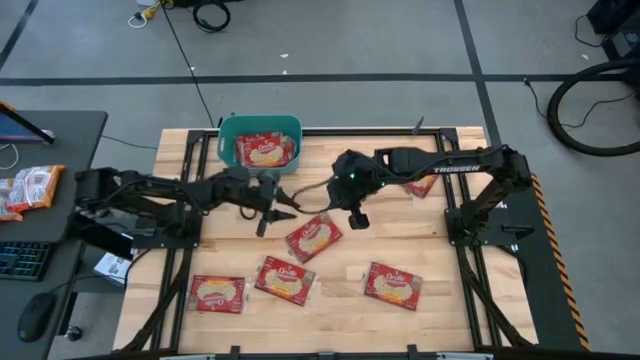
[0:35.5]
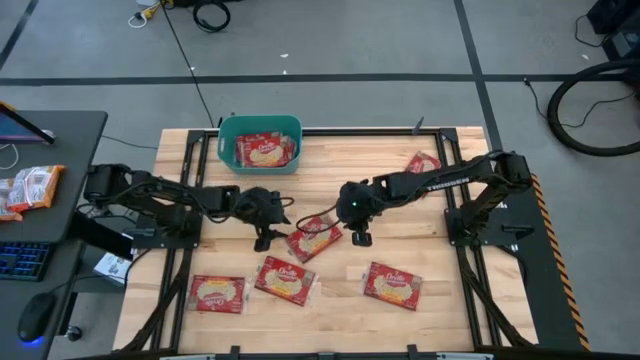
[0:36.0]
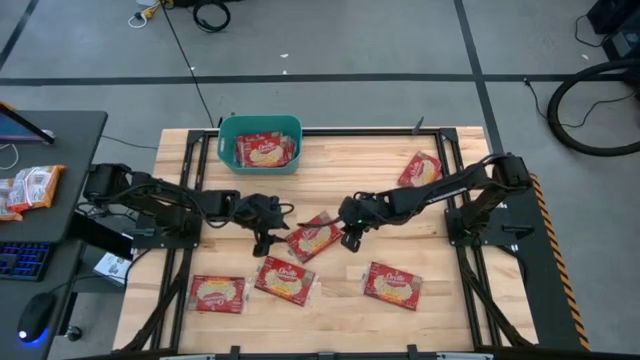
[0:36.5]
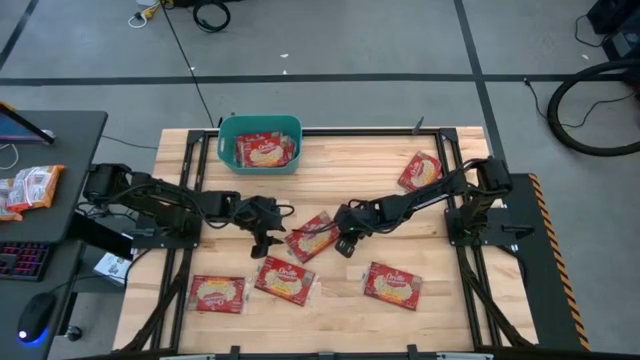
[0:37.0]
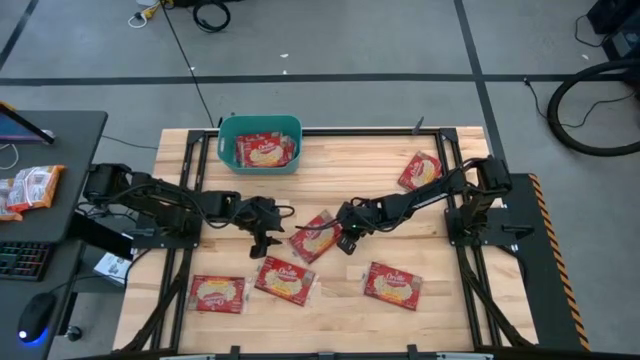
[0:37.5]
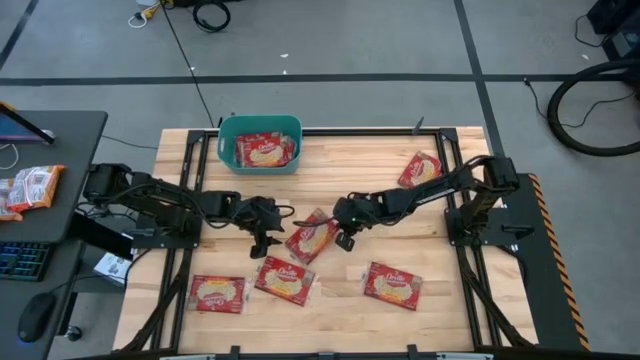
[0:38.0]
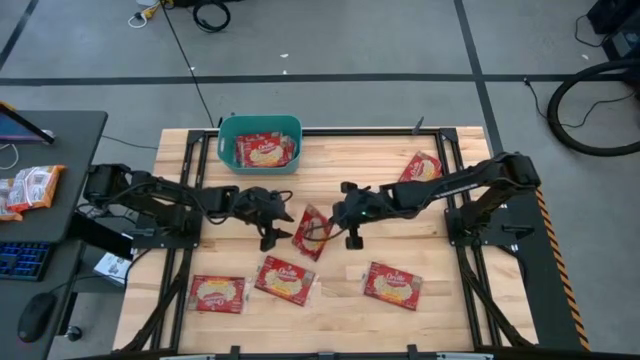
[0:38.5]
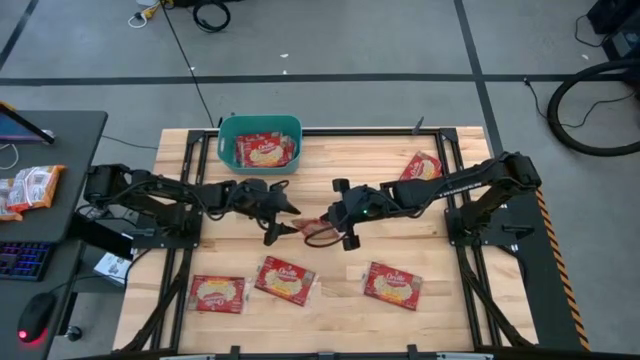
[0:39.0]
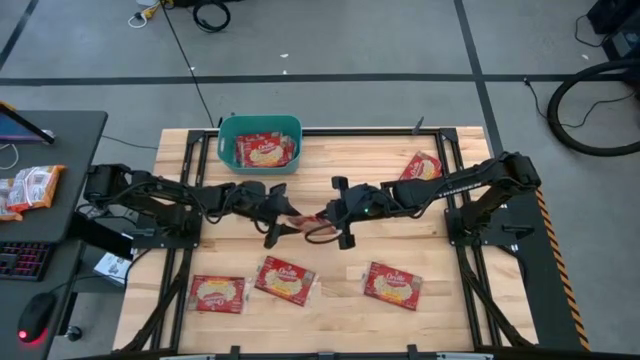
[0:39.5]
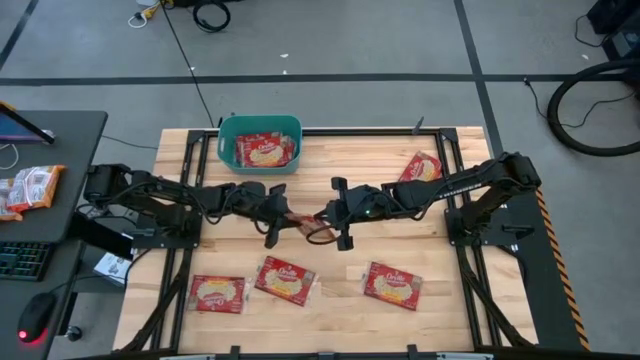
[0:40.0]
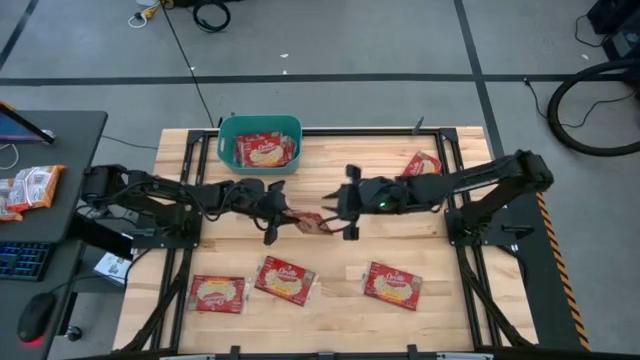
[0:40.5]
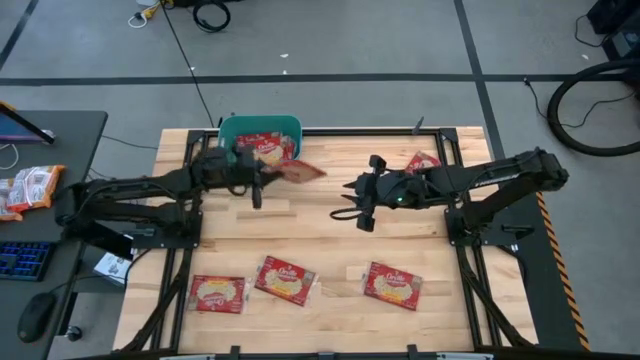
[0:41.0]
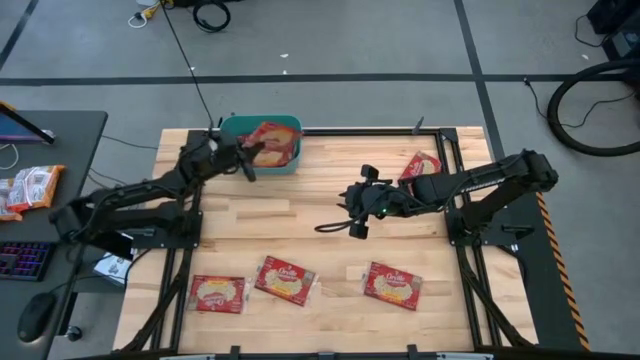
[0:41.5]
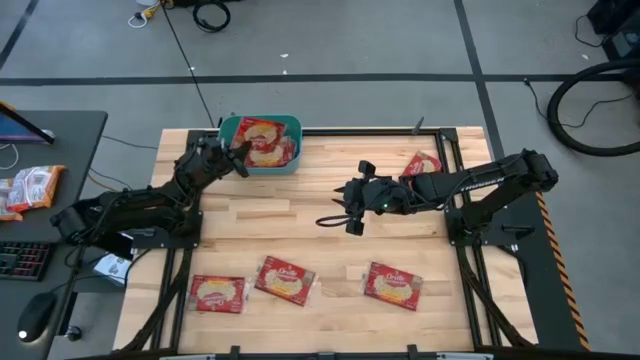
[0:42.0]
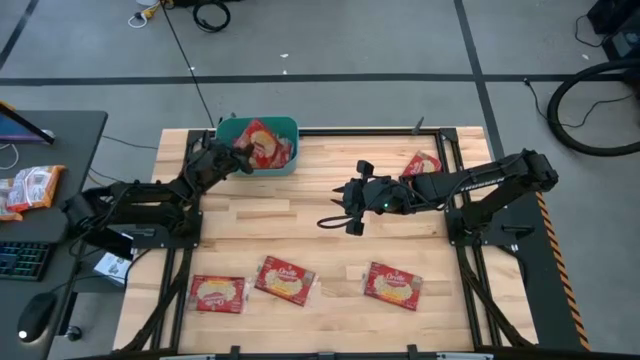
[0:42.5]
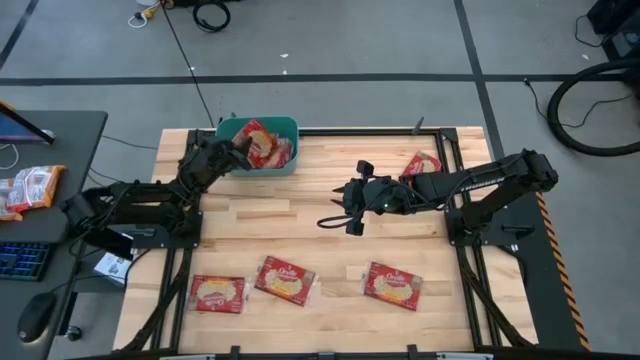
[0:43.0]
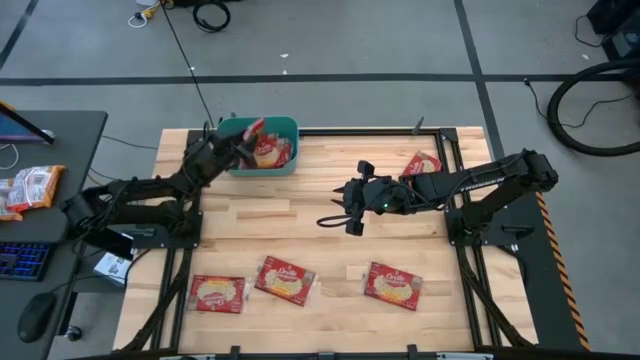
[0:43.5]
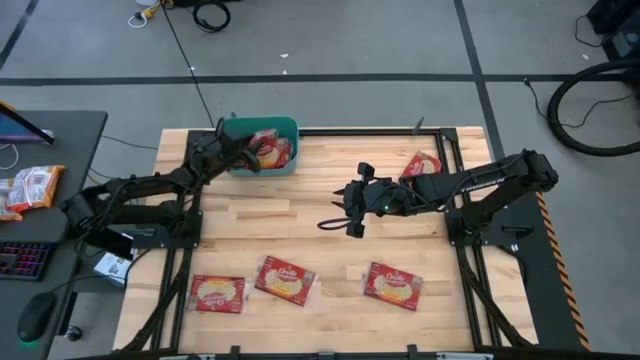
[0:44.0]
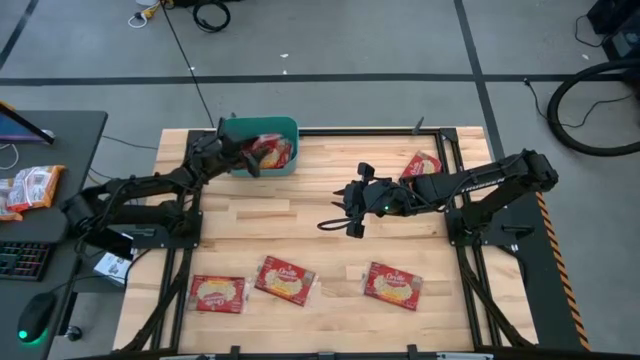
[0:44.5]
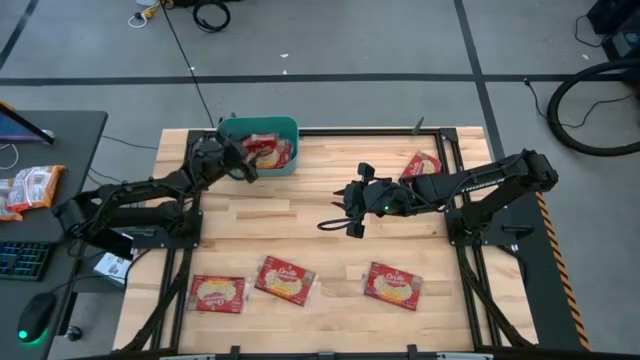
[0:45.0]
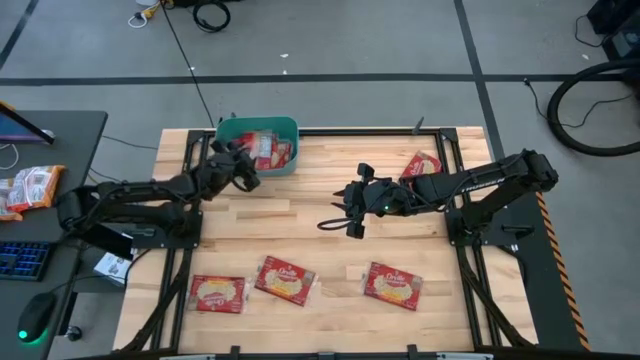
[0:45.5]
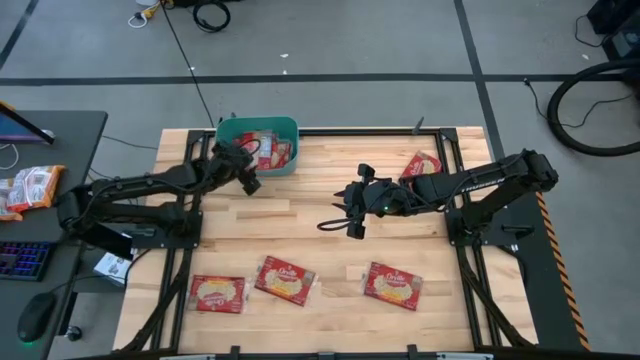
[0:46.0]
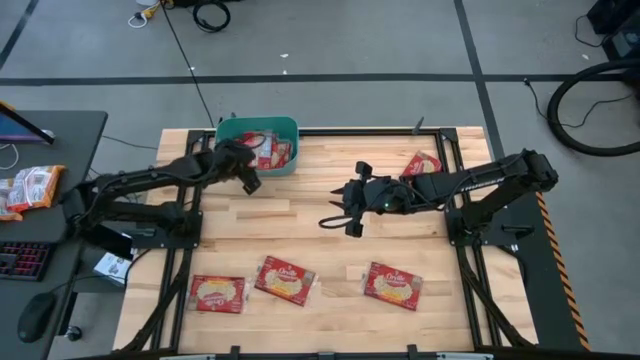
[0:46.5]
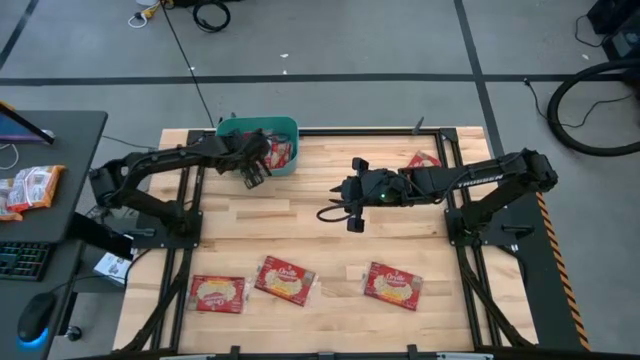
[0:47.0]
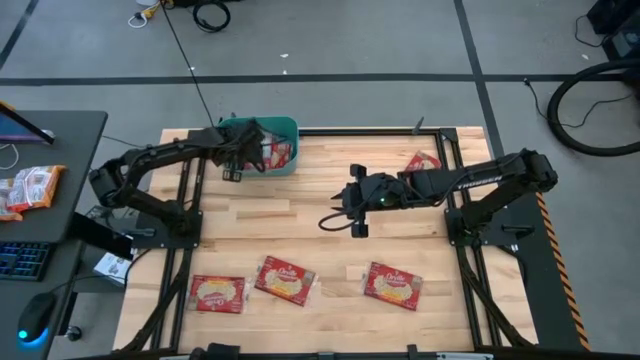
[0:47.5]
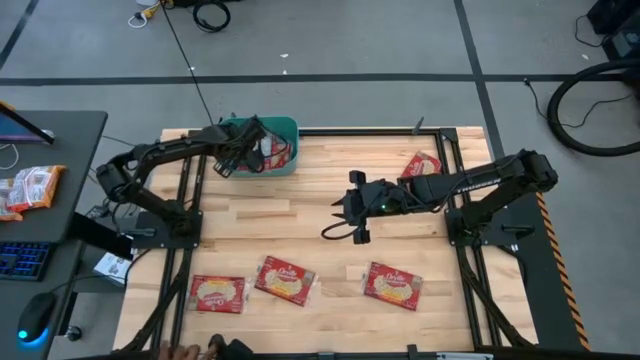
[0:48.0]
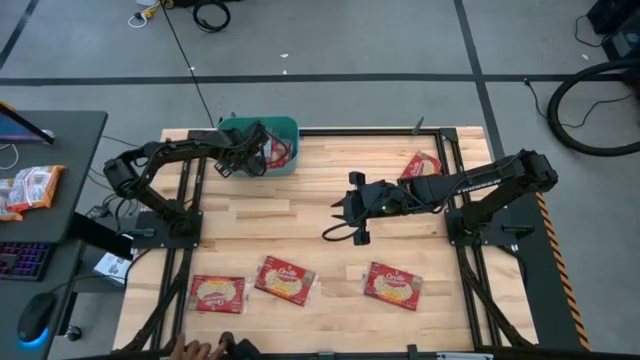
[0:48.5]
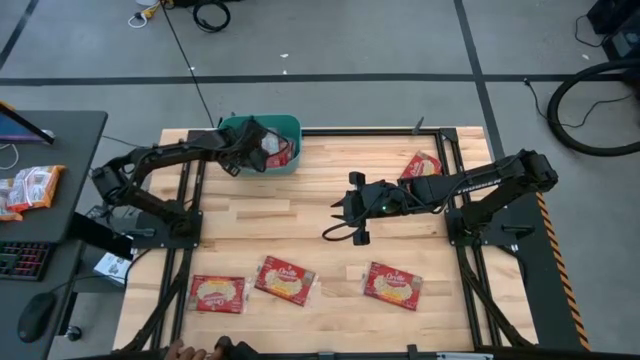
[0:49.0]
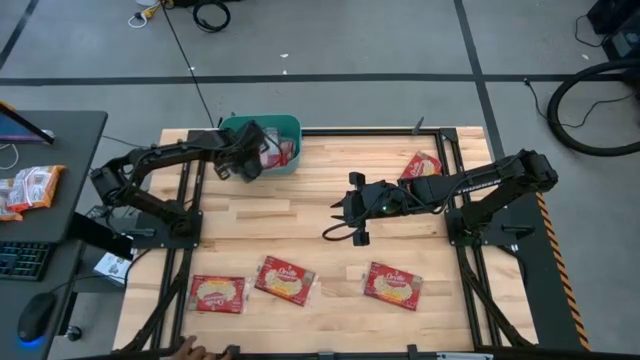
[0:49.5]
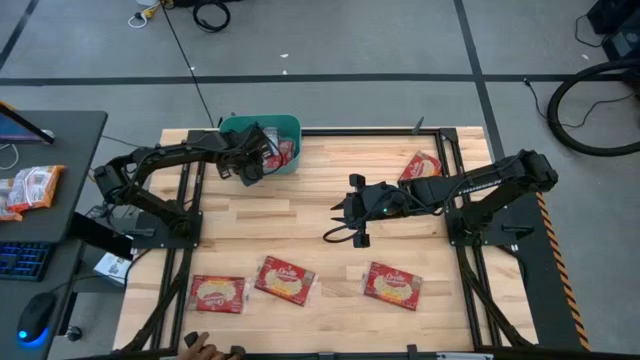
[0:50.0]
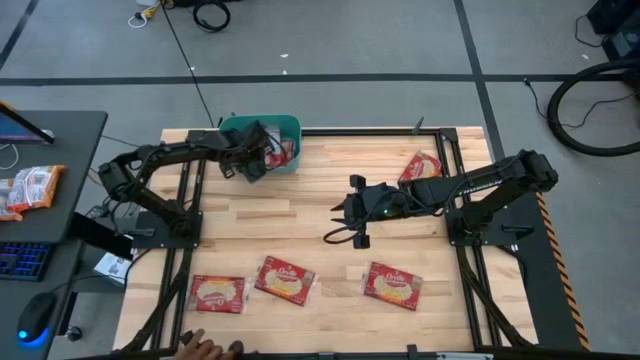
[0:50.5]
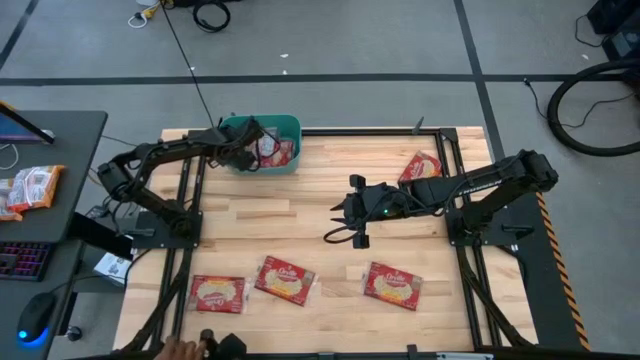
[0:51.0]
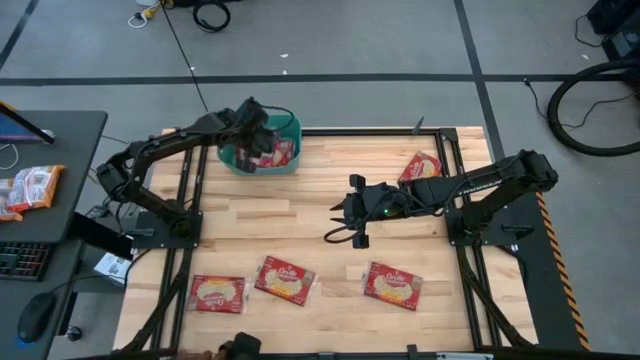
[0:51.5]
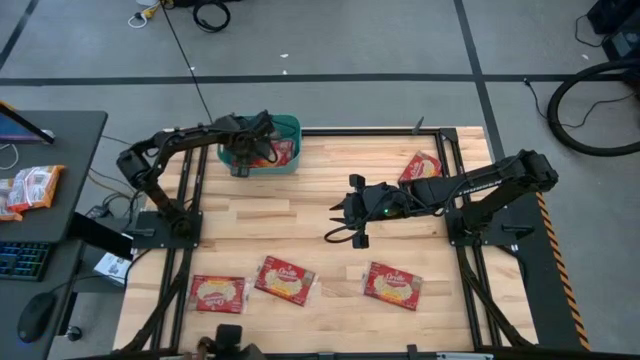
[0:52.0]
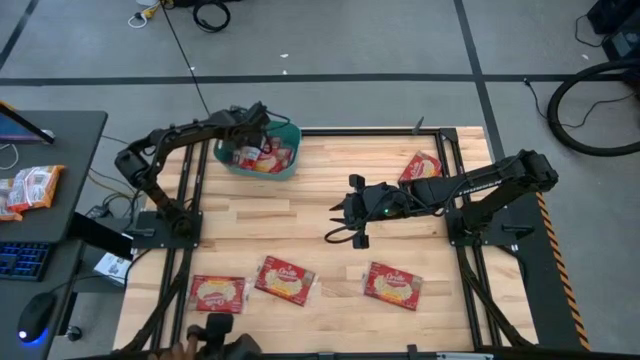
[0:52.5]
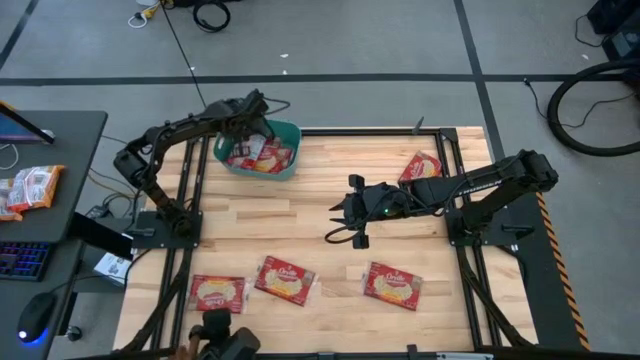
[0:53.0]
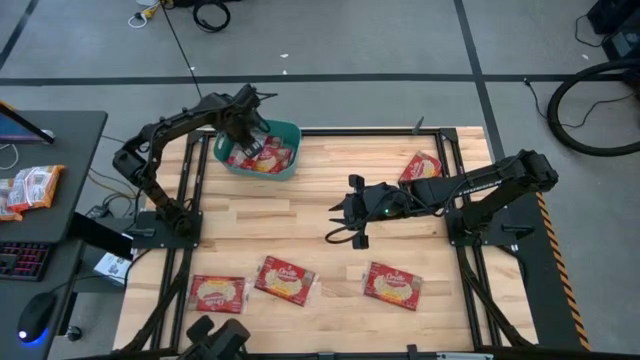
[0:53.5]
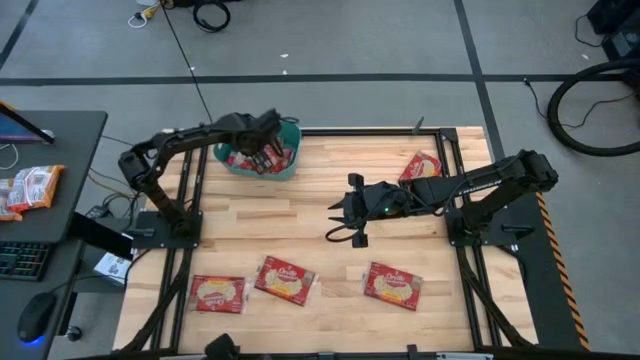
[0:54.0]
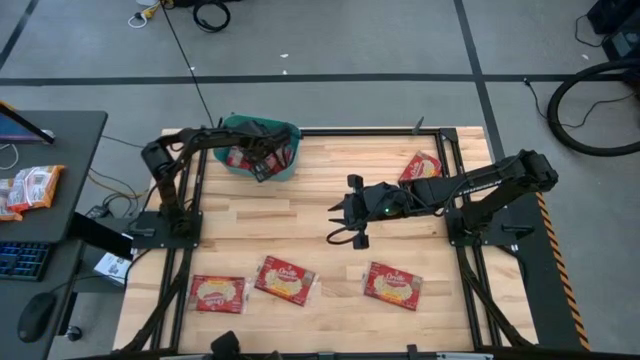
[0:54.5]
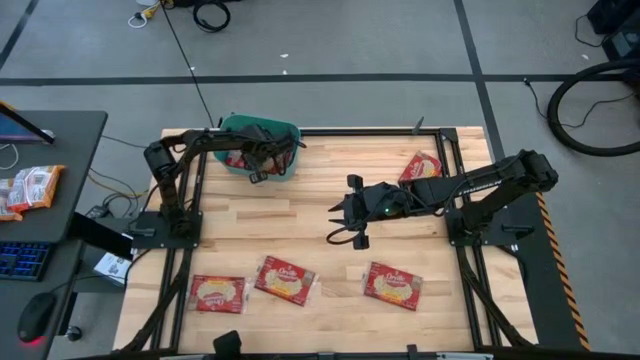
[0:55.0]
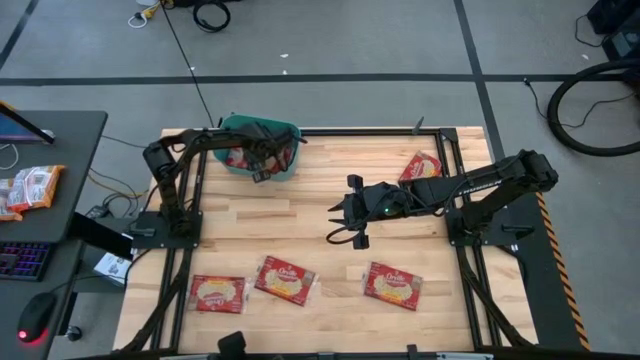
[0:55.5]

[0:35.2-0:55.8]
Task: Sort popcorn bags into baskets
Put the popcorn bag into the bin
